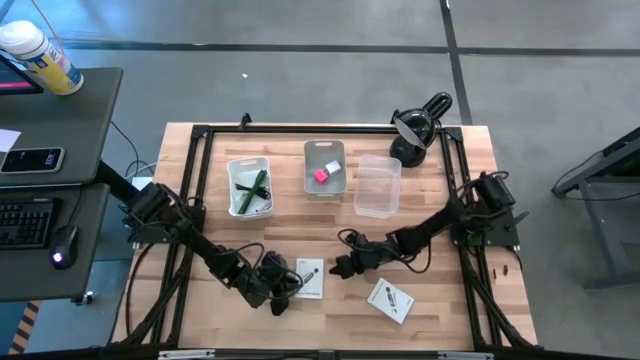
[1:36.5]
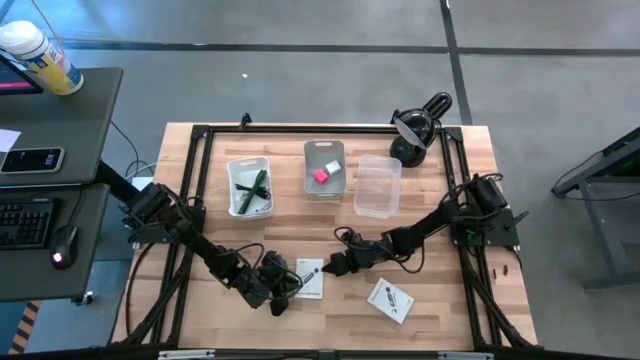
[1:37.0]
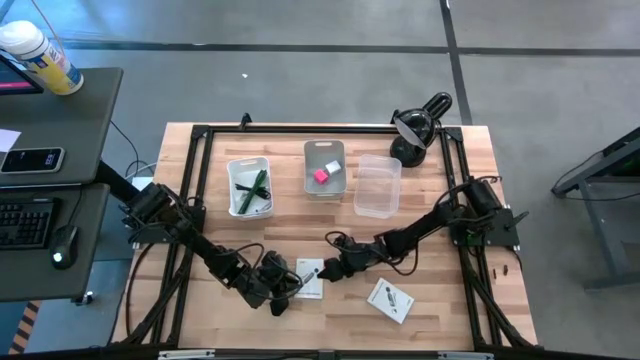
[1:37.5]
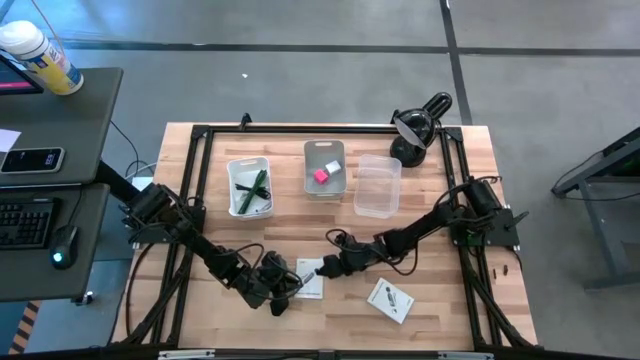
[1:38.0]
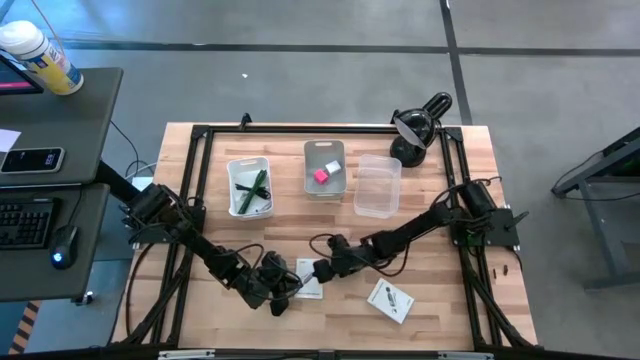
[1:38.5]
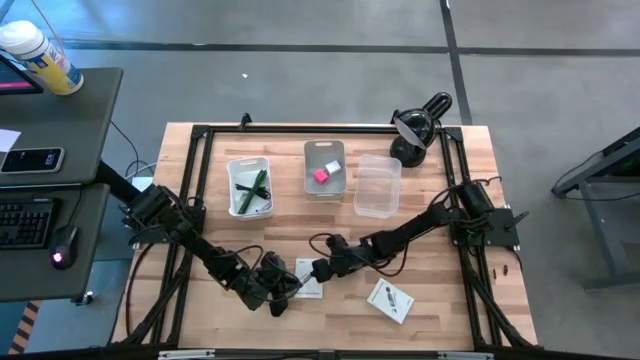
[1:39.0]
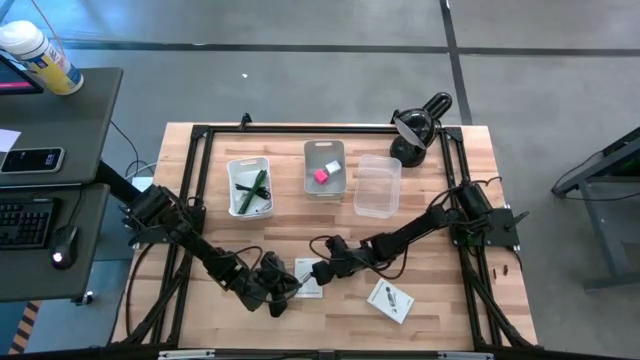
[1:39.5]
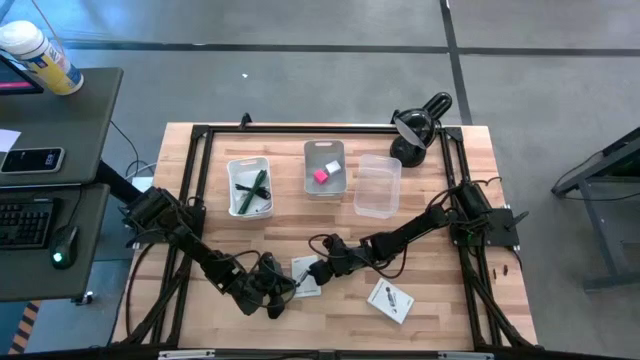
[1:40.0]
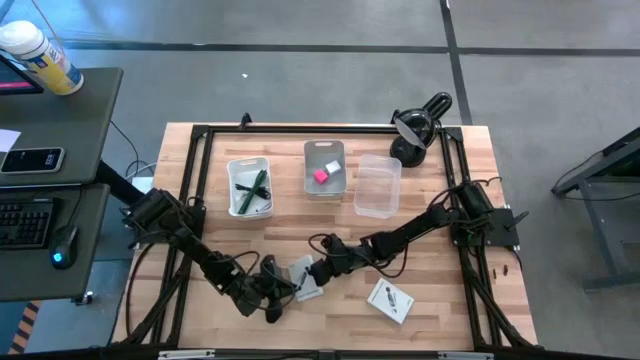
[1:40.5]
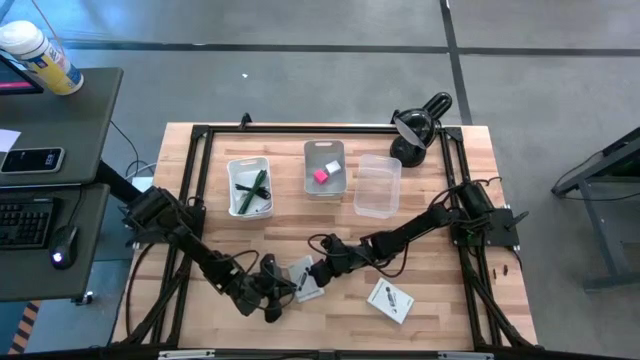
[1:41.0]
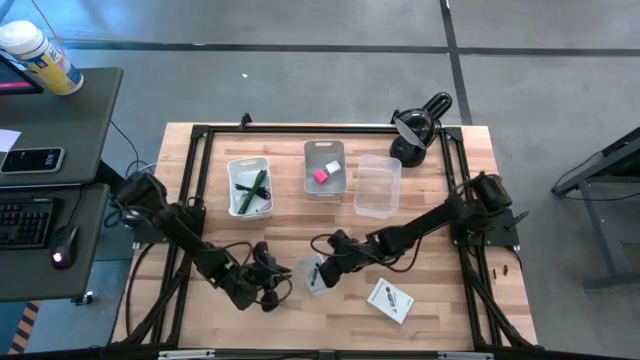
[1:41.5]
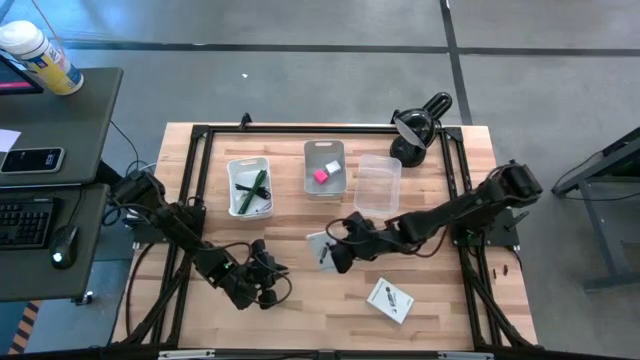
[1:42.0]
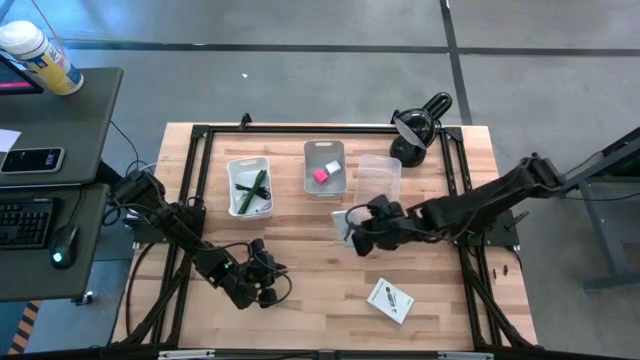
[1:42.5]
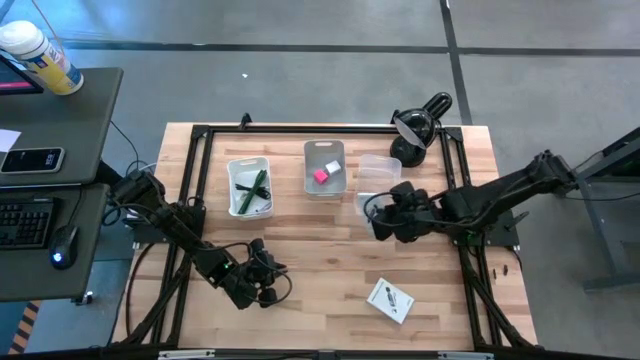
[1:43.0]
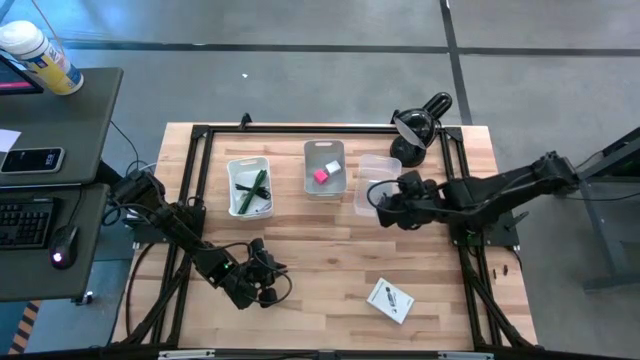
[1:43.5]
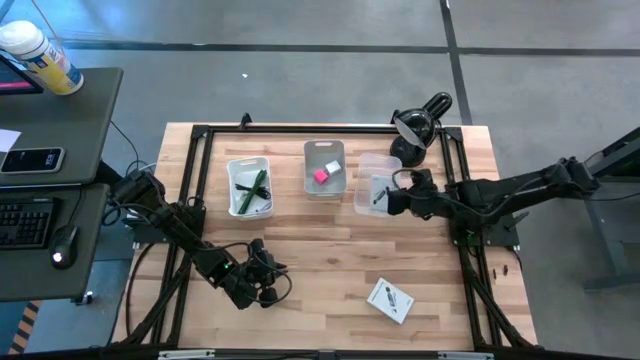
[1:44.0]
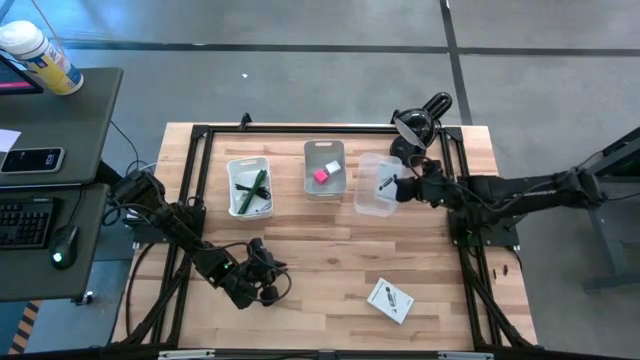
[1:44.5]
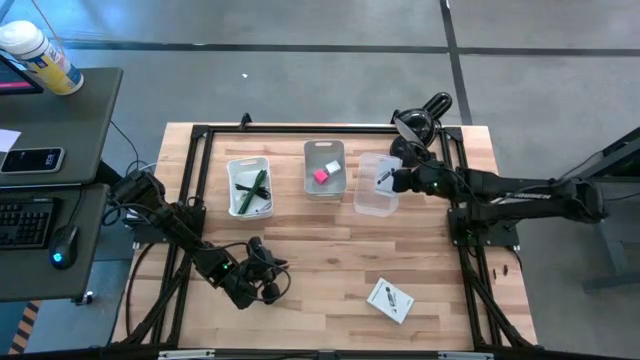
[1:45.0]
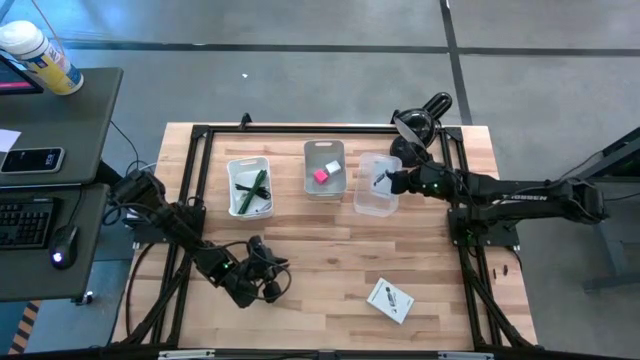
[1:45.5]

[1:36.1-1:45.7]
Task: Pick and place items into bin
Put the left card reader box into the transparent bin

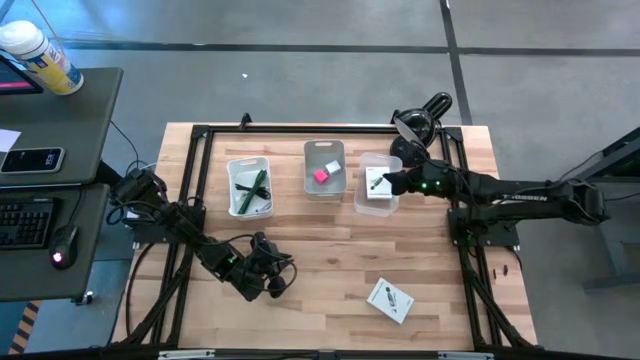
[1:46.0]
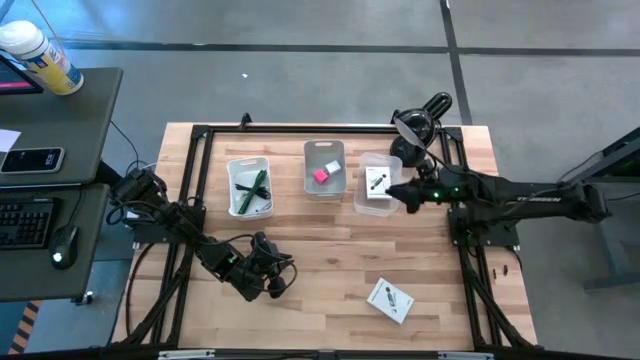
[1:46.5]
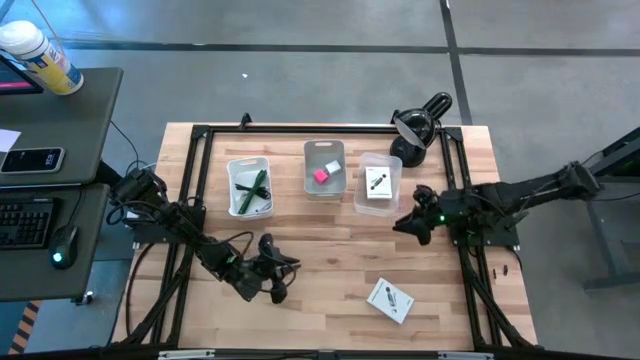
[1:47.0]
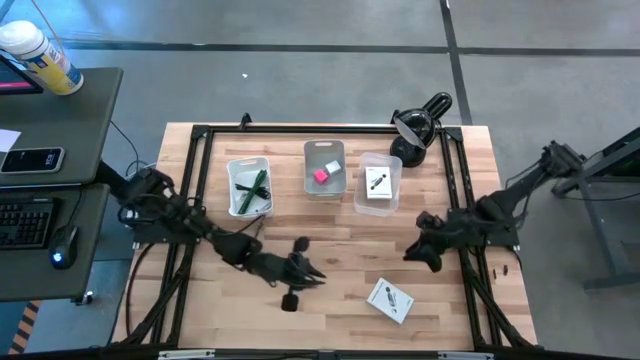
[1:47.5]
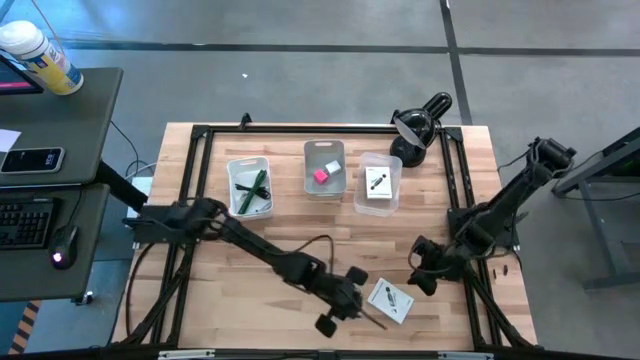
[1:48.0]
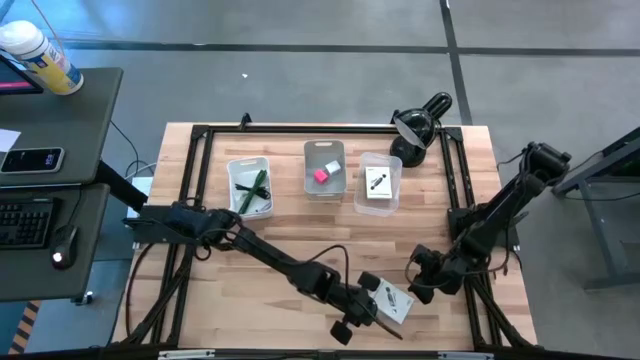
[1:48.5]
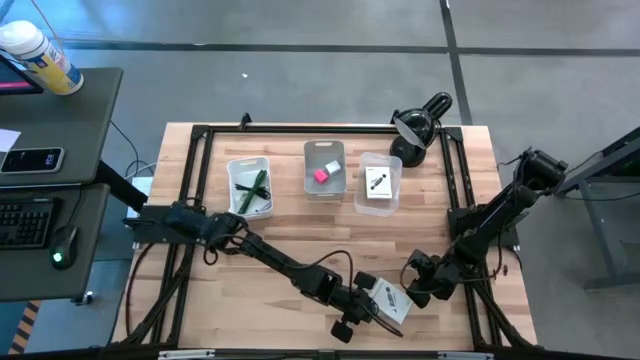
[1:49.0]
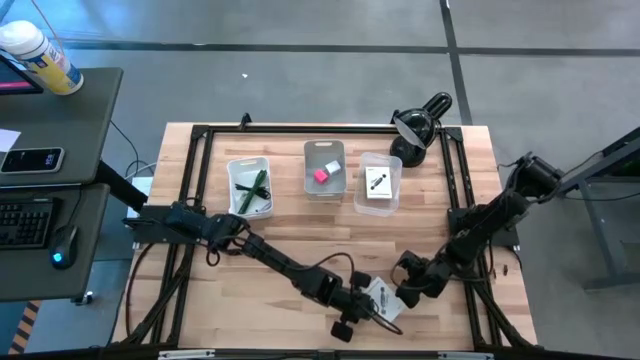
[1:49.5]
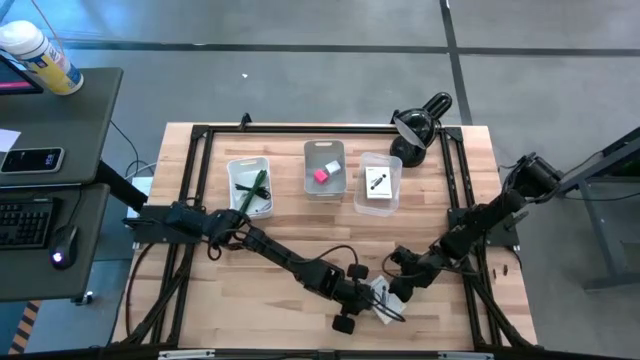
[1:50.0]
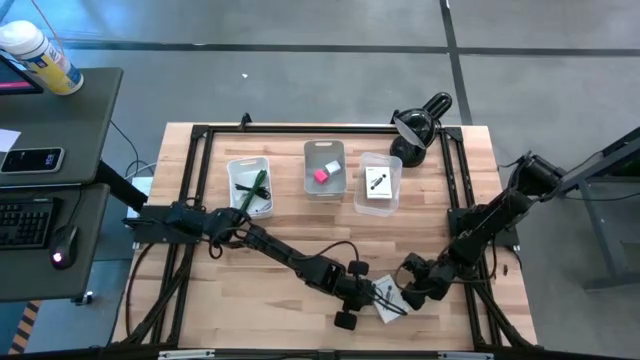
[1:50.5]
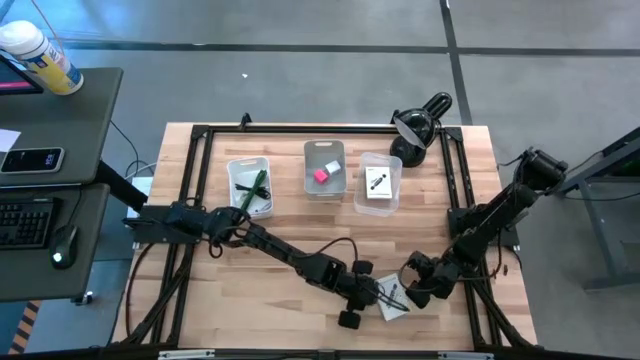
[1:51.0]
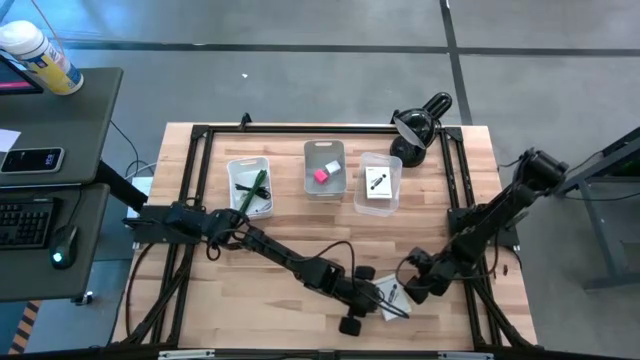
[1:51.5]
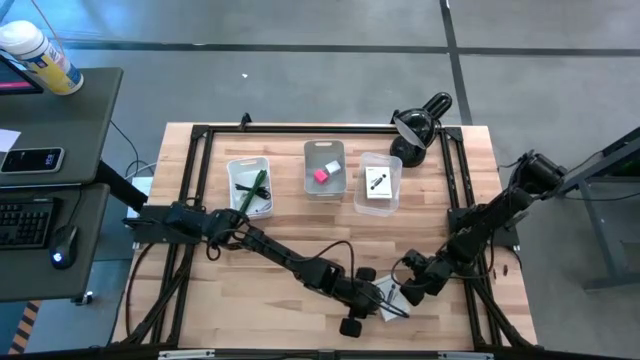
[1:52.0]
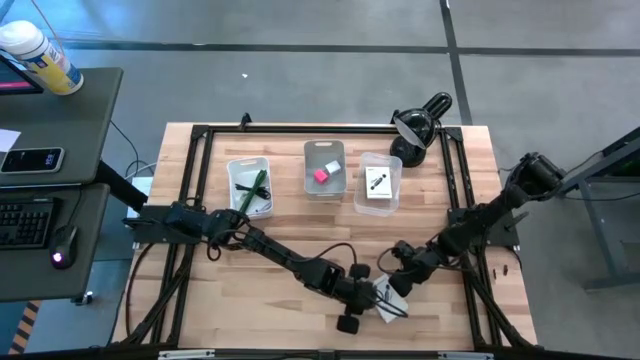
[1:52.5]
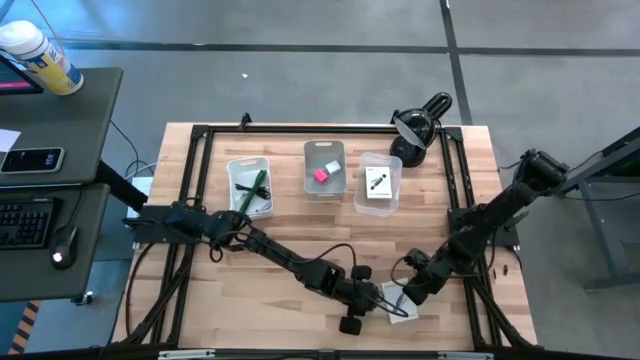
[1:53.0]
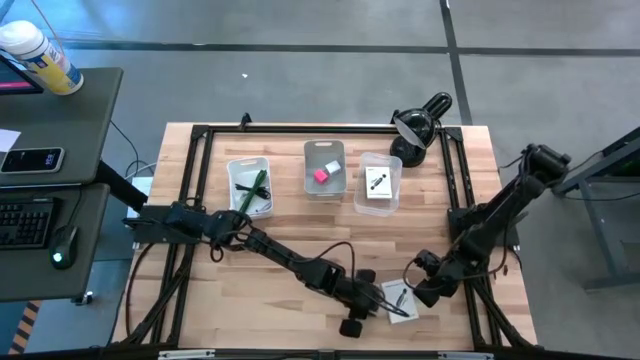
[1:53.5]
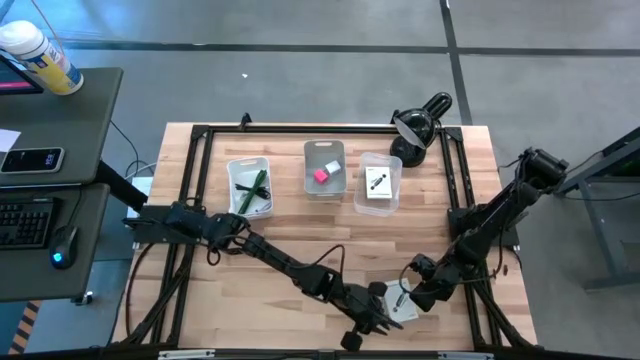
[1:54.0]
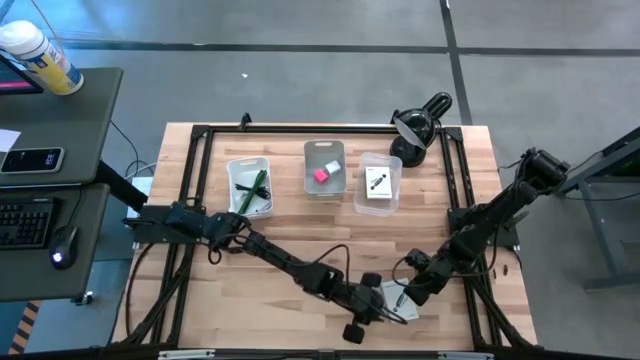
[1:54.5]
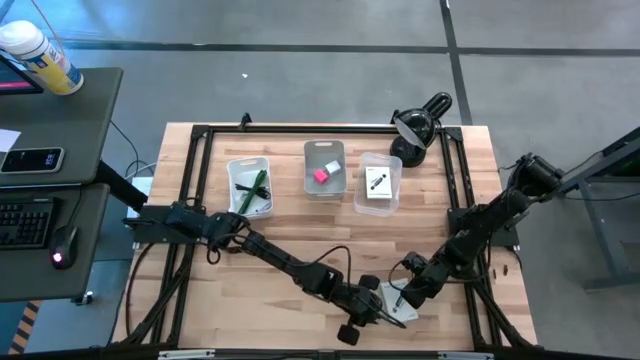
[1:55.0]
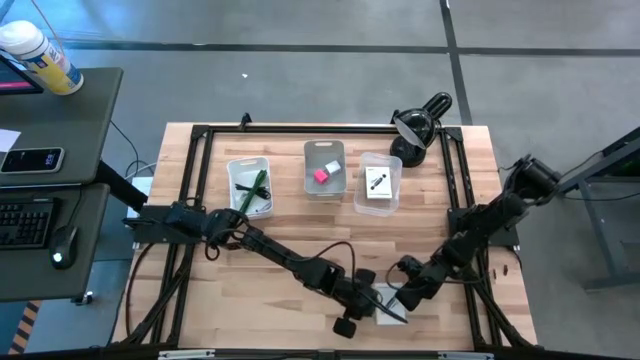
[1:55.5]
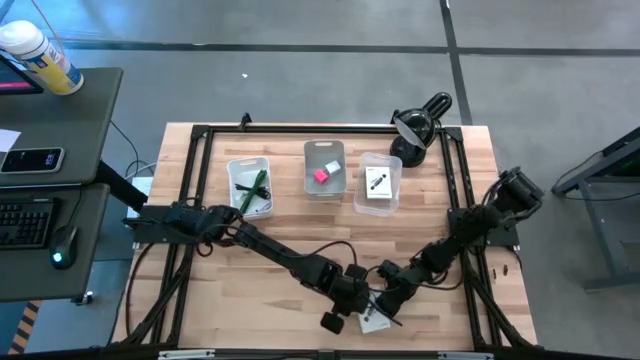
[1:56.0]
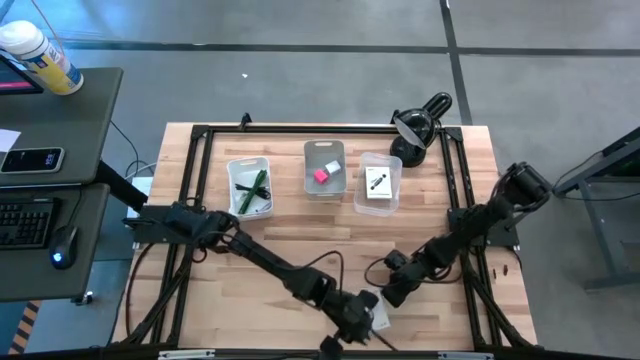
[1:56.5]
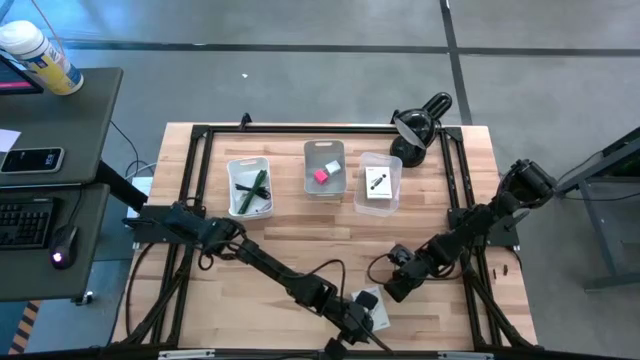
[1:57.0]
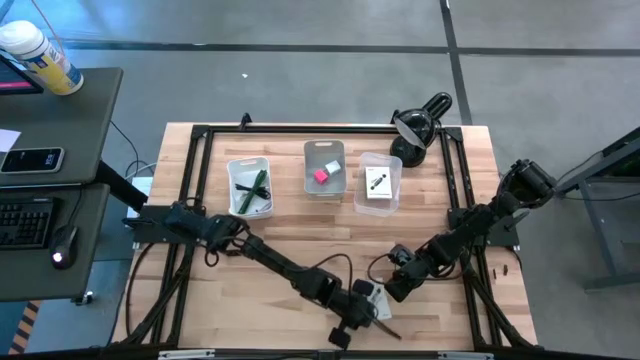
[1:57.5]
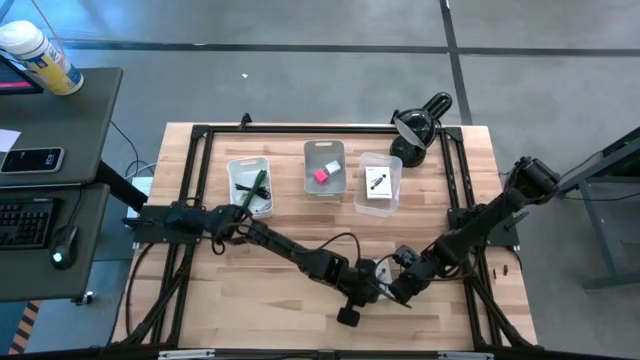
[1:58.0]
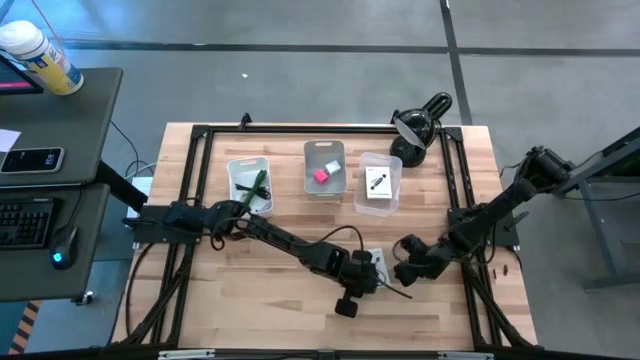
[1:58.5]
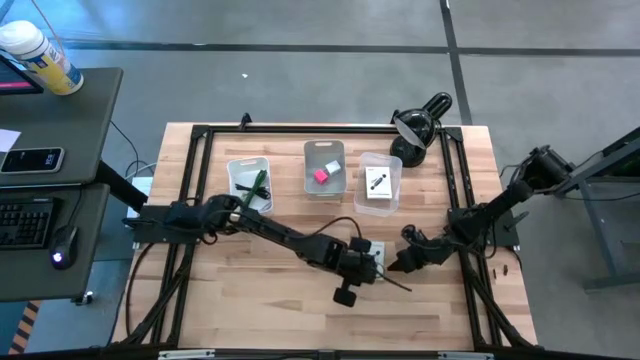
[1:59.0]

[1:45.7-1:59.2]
Put the card reader box into the transparent bin
